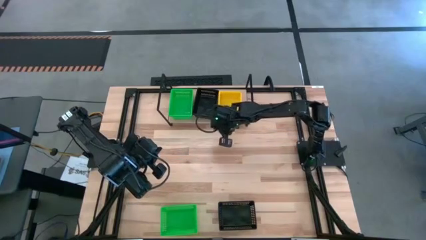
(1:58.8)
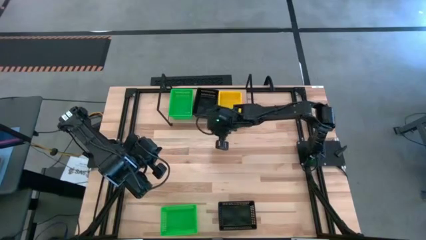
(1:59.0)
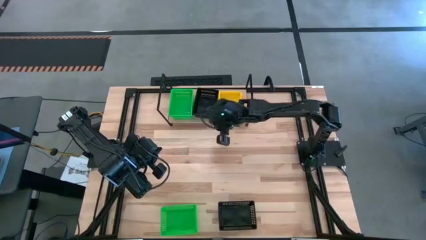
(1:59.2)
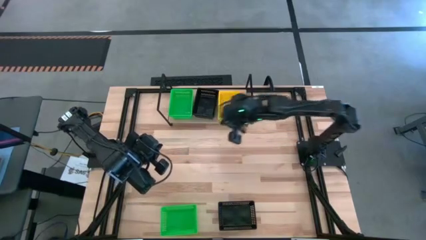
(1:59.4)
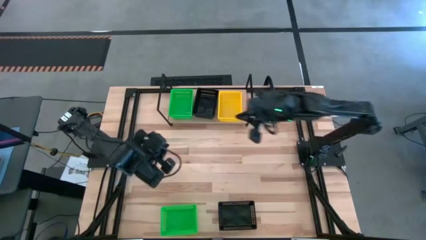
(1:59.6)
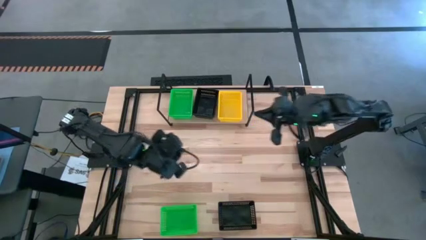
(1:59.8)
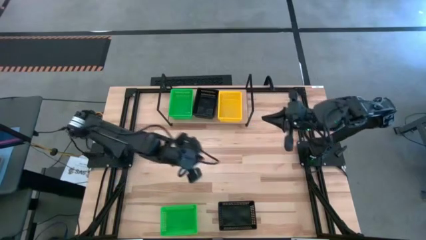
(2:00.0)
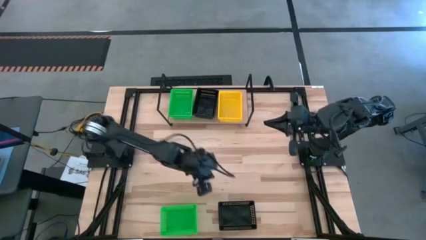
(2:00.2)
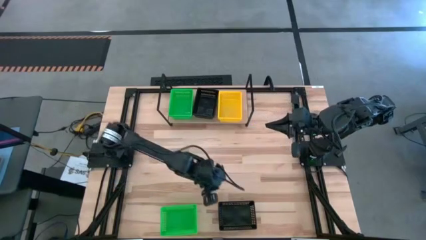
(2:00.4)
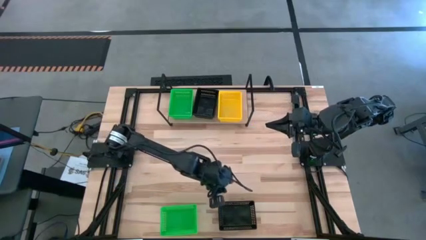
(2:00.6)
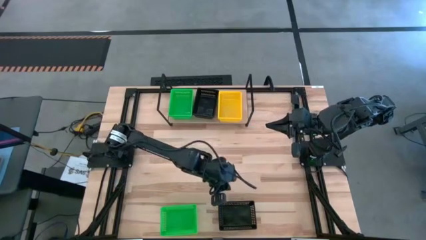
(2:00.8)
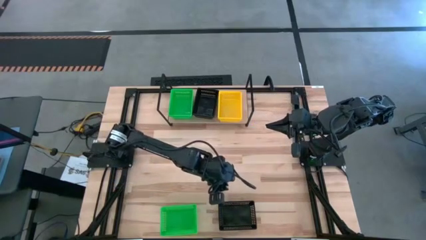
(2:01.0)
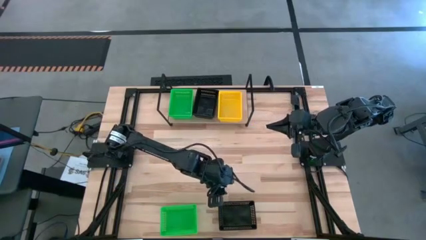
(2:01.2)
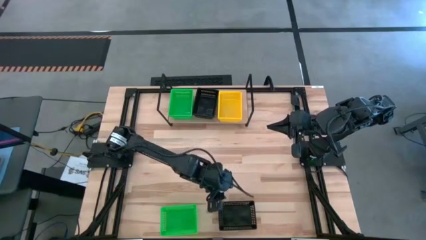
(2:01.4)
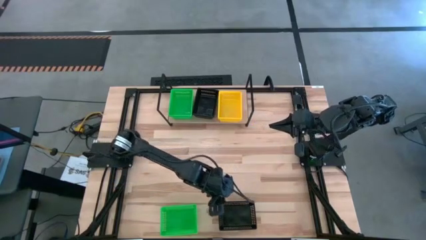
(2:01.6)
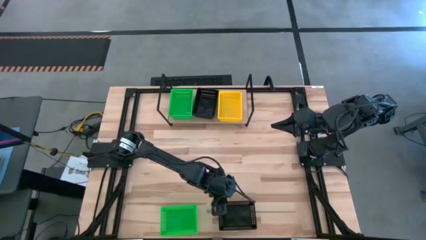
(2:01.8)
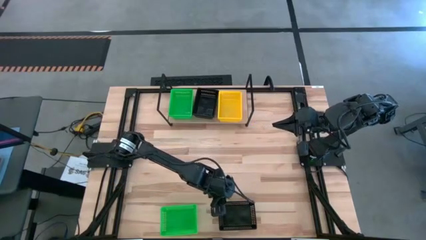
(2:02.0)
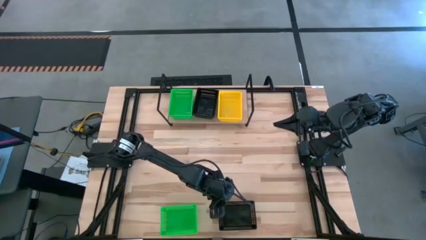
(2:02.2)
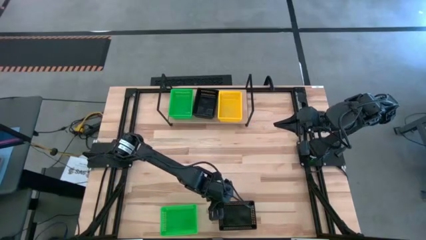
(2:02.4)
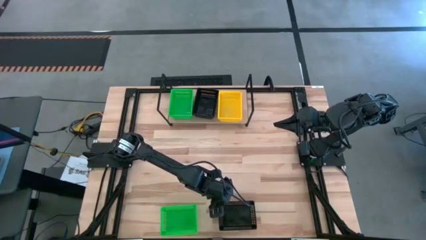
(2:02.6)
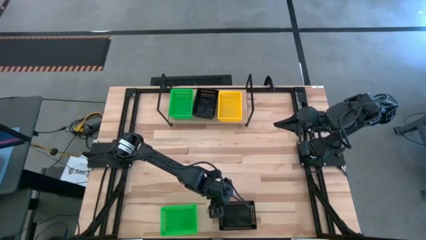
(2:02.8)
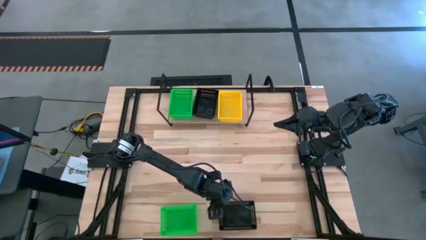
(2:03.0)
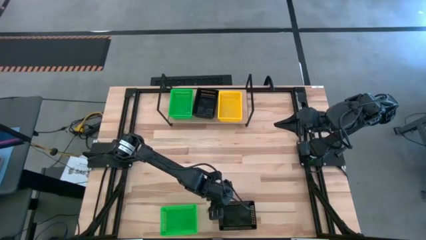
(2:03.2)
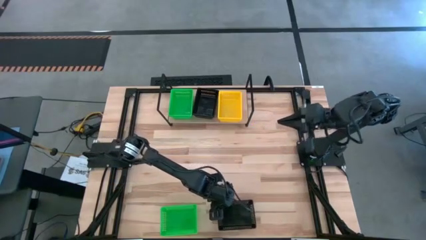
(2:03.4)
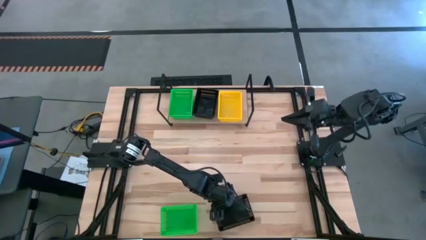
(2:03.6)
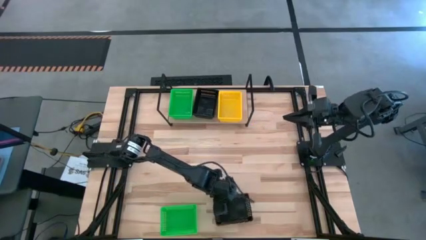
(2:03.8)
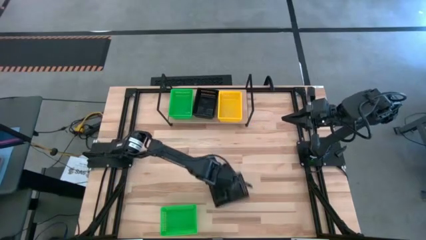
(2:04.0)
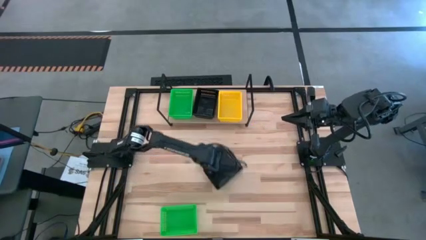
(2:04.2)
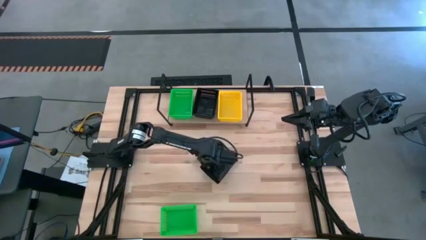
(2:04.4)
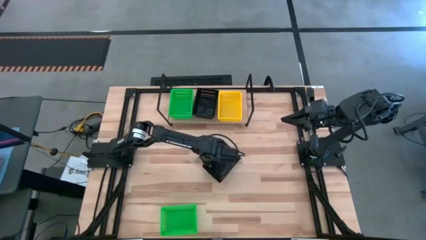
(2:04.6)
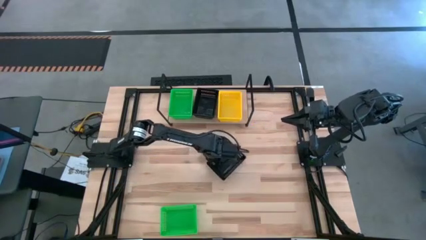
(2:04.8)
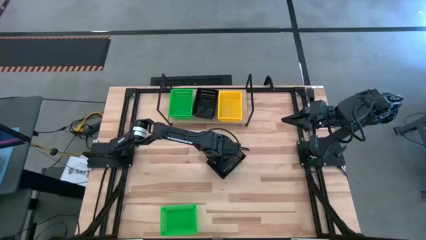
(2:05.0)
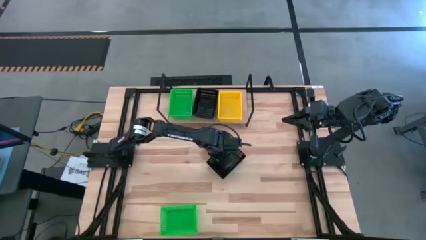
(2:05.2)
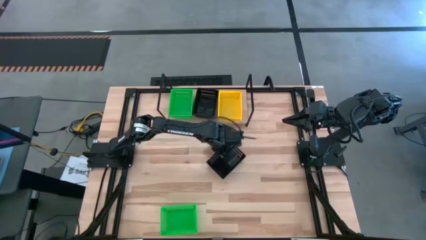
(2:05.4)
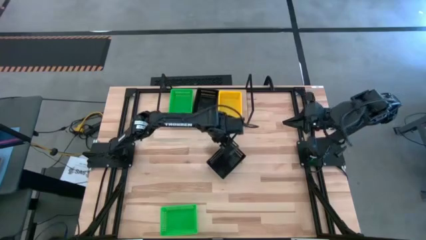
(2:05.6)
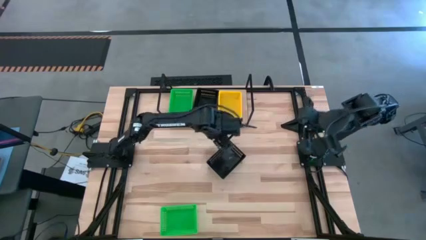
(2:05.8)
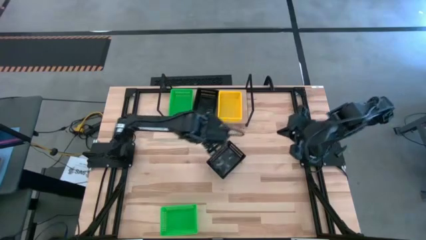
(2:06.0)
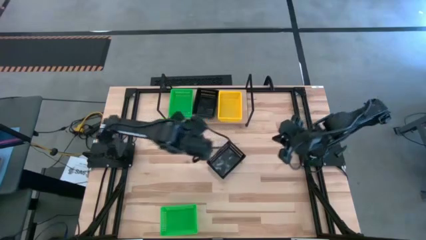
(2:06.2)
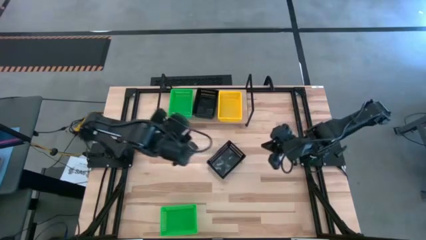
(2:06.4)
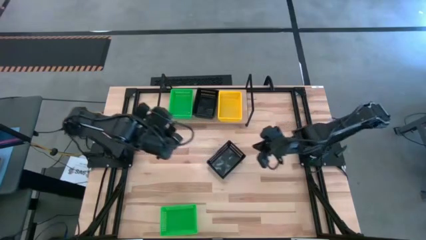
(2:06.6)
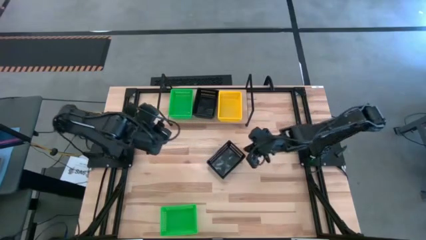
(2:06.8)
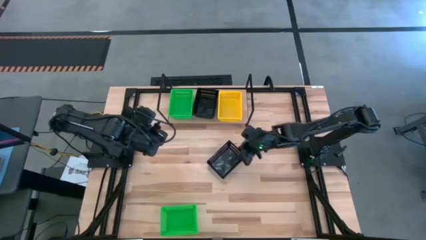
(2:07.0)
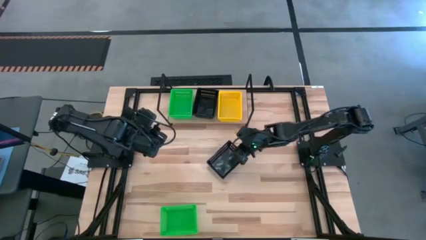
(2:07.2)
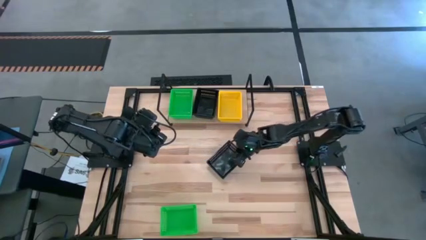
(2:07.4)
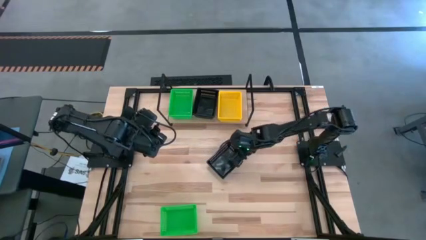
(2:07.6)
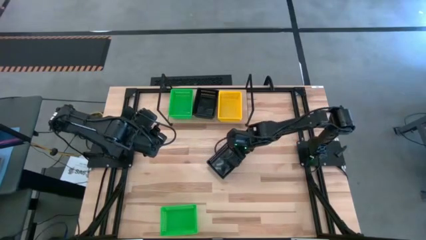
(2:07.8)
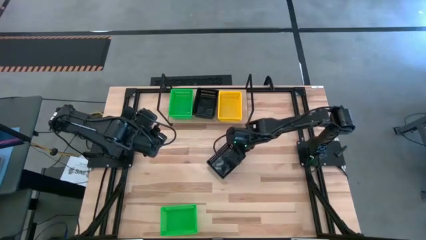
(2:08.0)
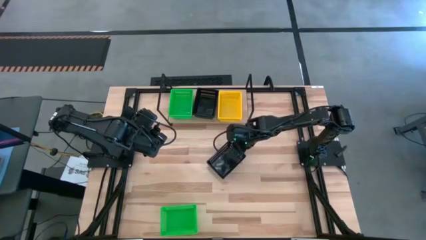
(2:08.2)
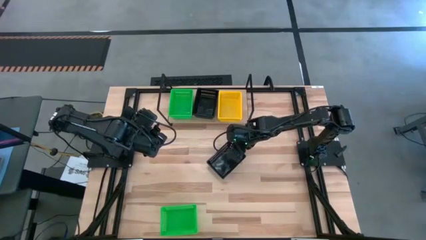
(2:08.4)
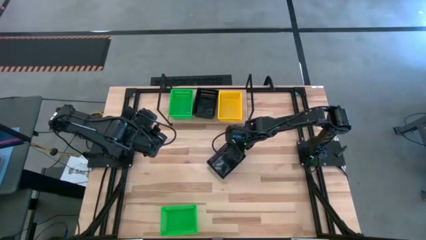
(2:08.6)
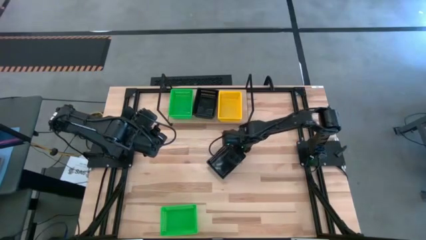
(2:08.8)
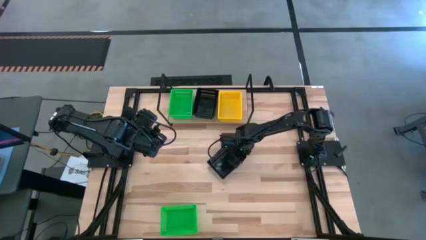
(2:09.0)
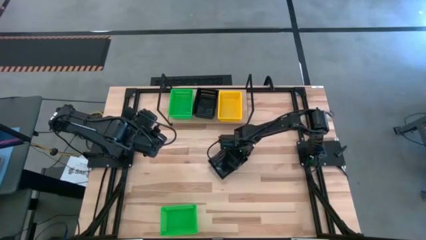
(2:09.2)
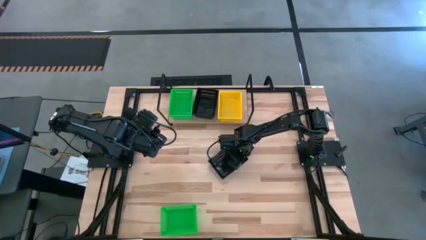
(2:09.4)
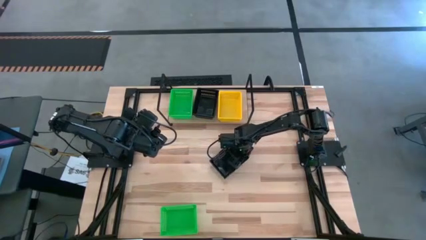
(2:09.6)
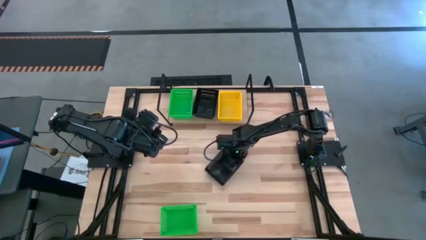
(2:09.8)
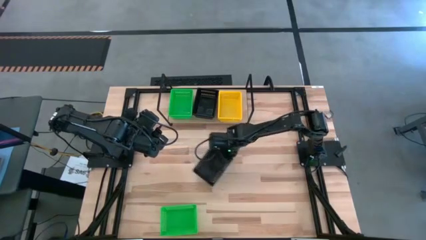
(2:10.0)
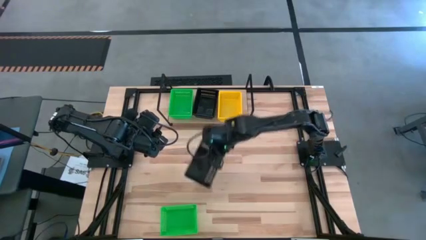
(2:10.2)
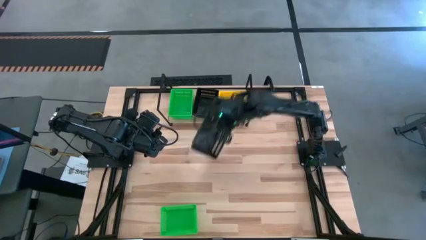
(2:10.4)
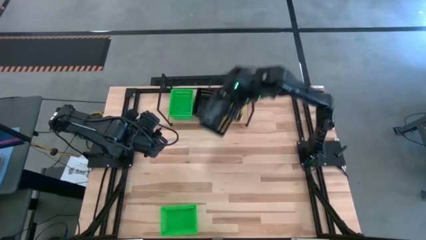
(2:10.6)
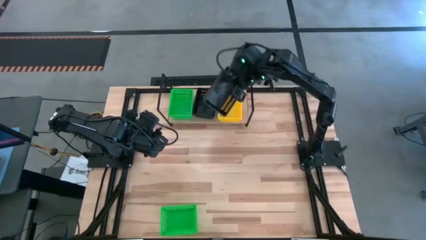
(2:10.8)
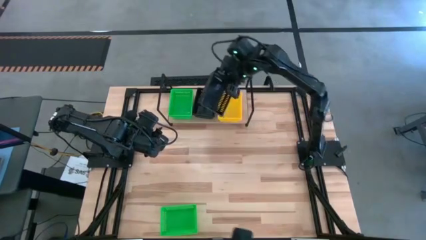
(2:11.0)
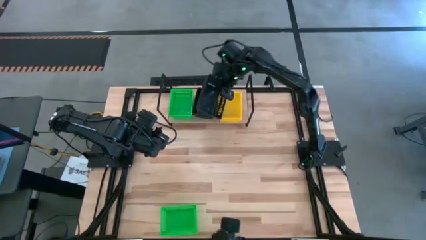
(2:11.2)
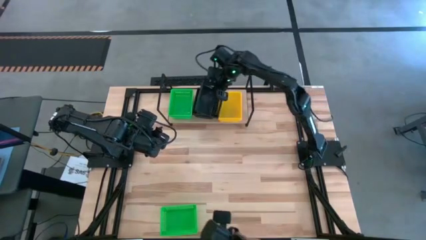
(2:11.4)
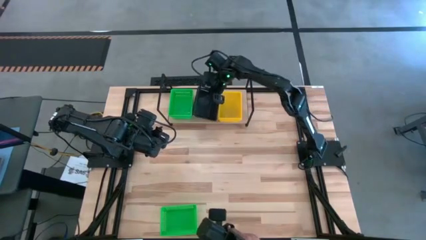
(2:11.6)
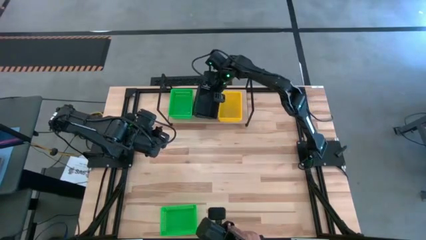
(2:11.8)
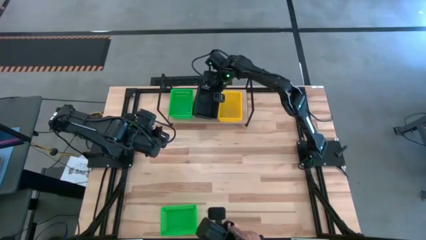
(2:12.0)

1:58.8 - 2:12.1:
Task: Stack baskets on shelf by color
Stack the black basket on top of the black basket on the shelf
